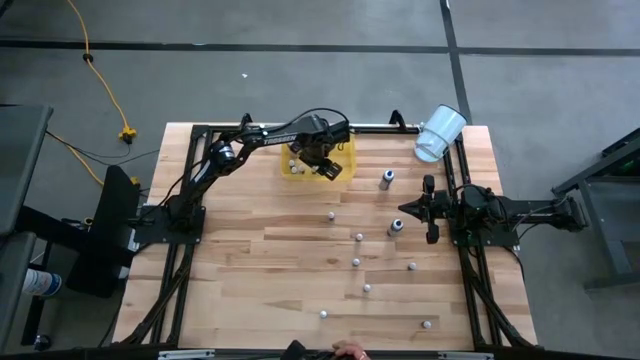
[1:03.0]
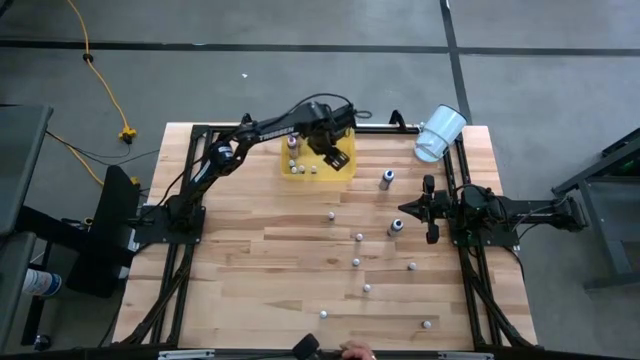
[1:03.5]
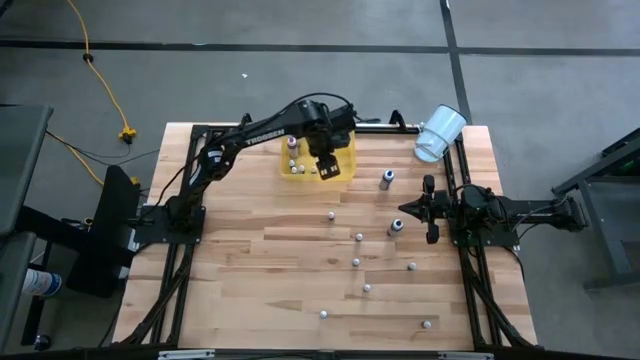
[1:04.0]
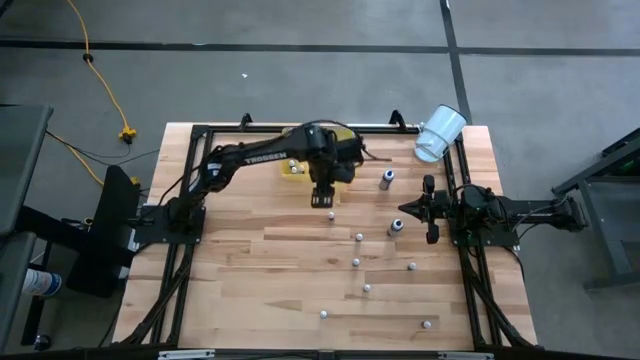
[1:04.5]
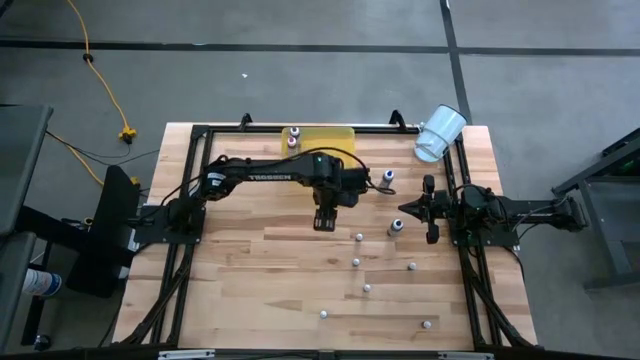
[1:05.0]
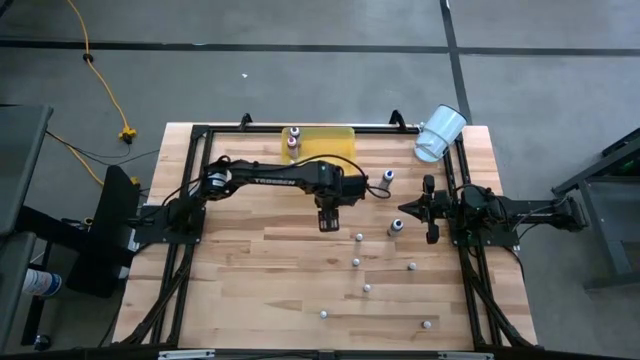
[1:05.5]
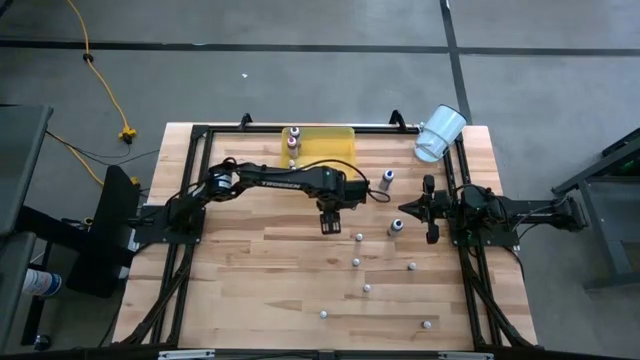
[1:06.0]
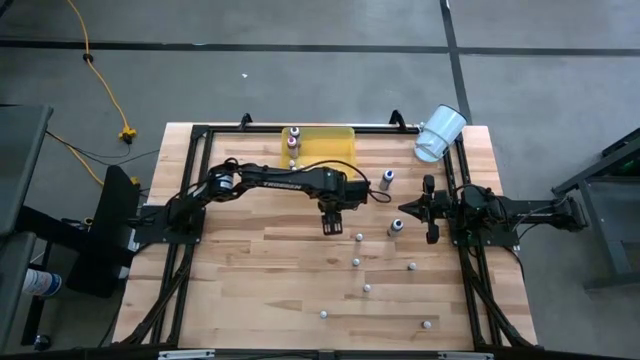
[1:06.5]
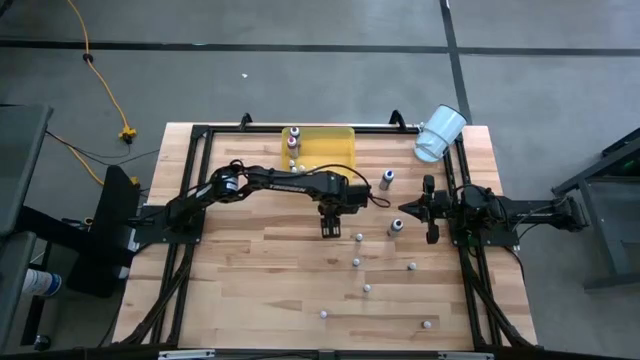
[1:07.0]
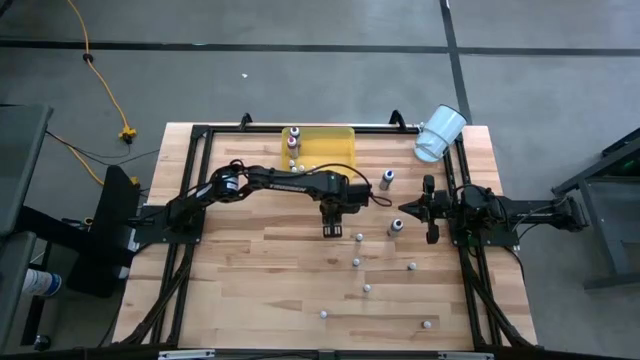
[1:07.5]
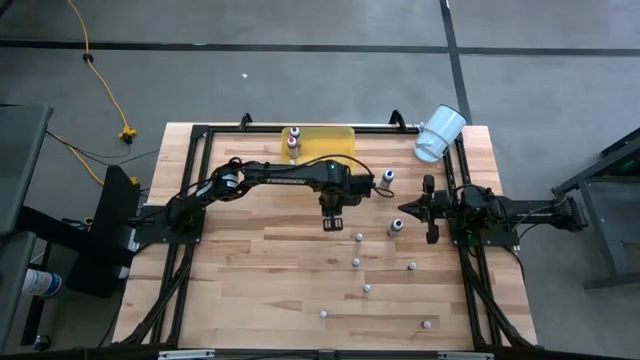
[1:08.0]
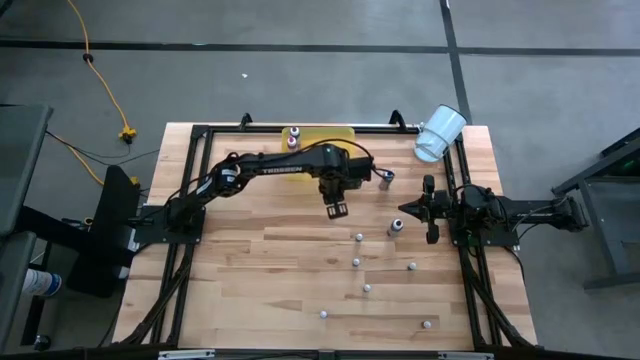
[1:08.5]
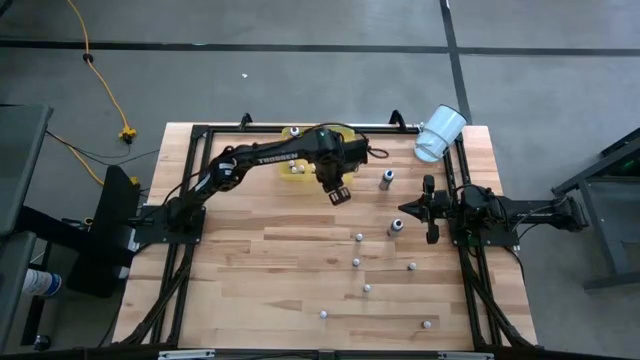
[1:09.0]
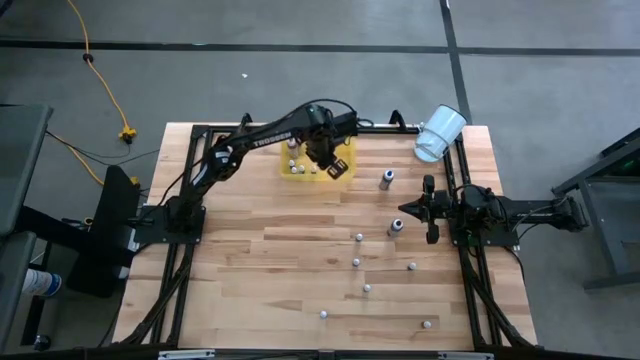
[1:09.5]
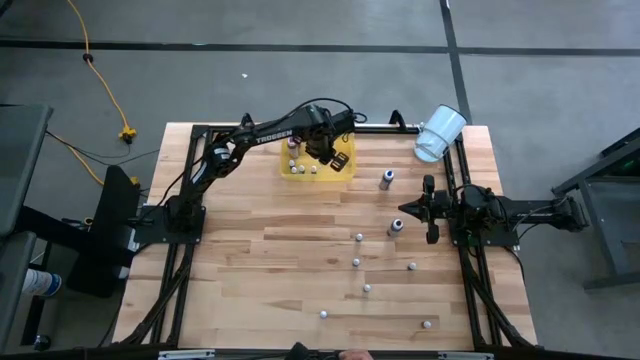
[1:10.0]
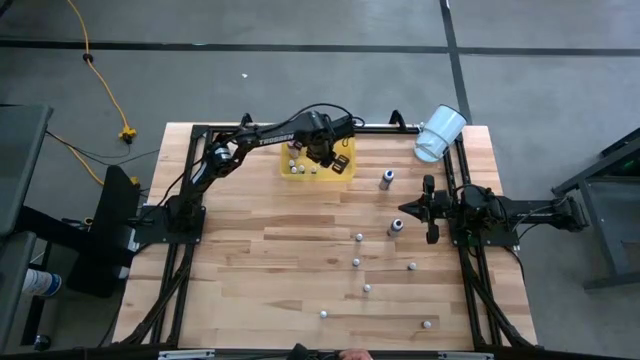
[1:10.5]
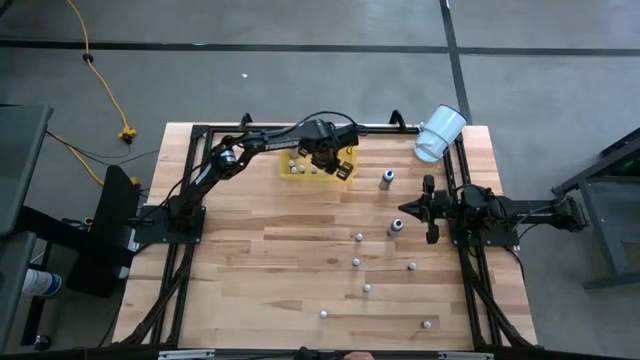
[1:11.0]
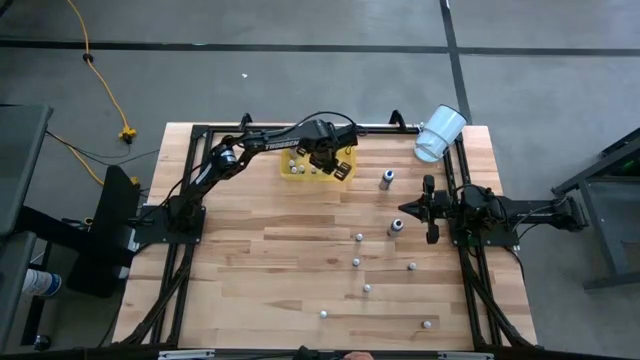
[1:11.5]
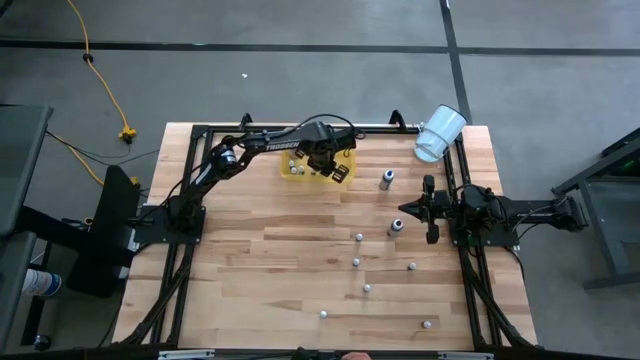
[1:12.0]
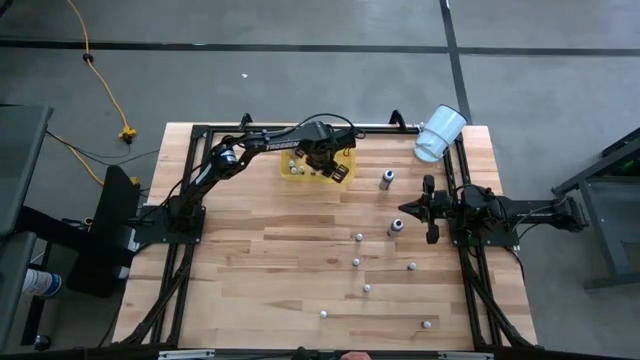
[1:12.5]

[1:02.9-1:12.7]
Task: Pick & Place food coloring
Put the small black food coloring into the yellow container

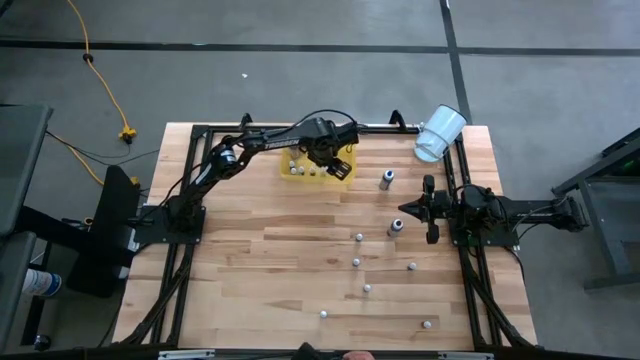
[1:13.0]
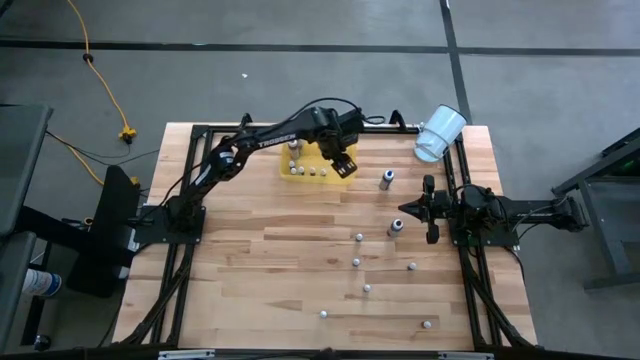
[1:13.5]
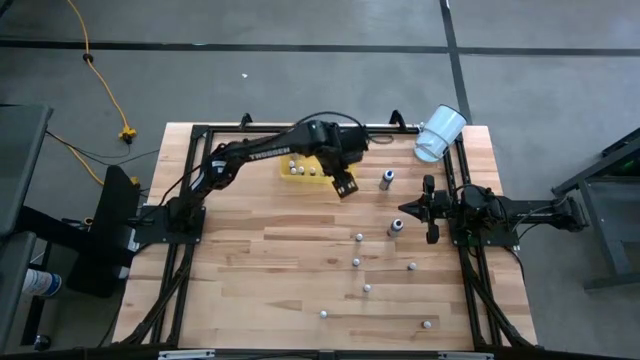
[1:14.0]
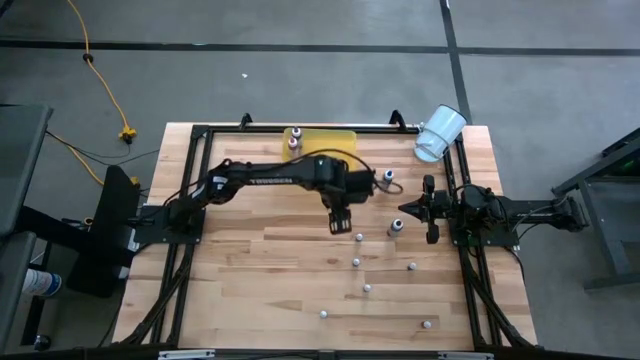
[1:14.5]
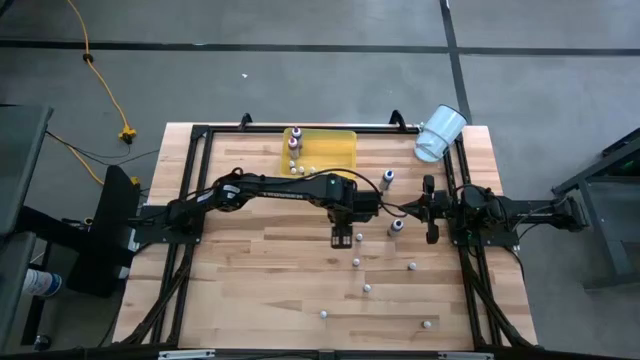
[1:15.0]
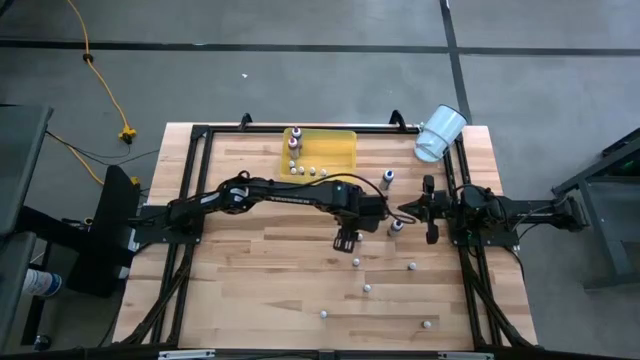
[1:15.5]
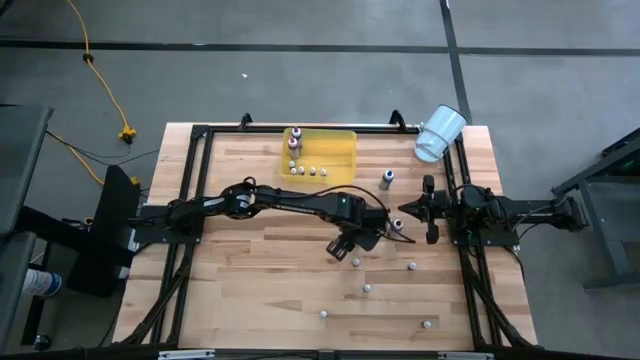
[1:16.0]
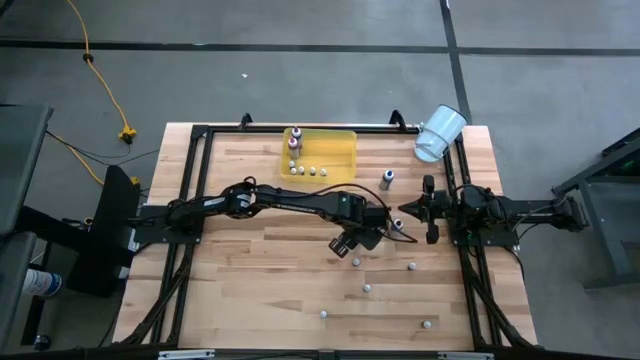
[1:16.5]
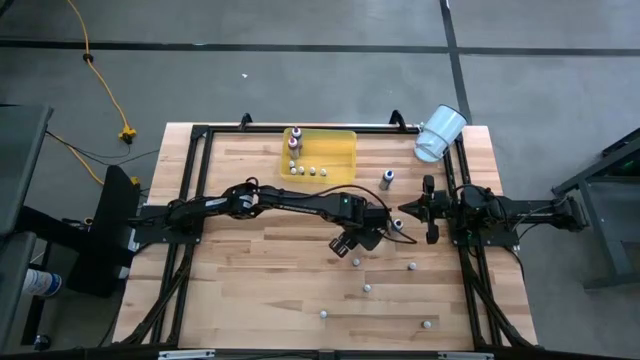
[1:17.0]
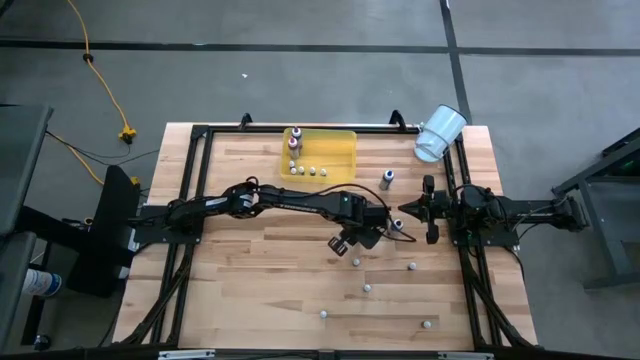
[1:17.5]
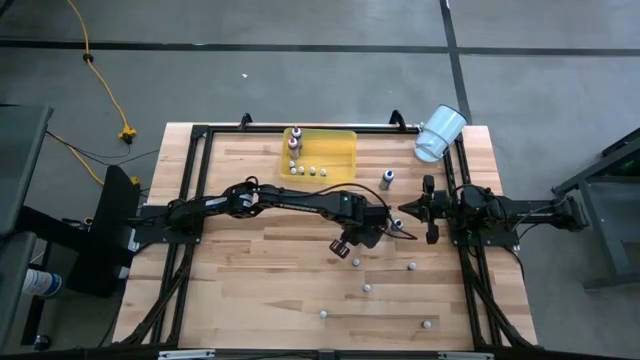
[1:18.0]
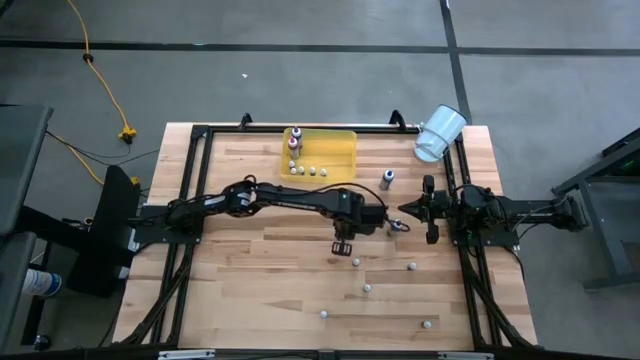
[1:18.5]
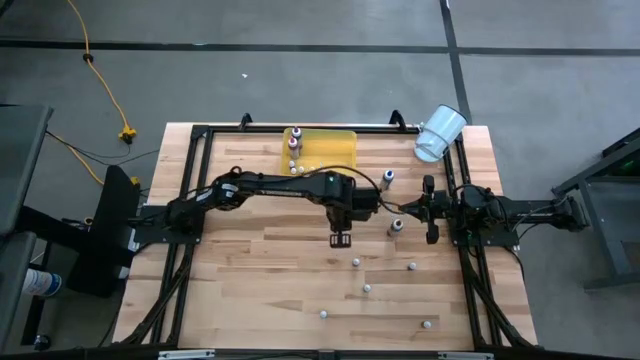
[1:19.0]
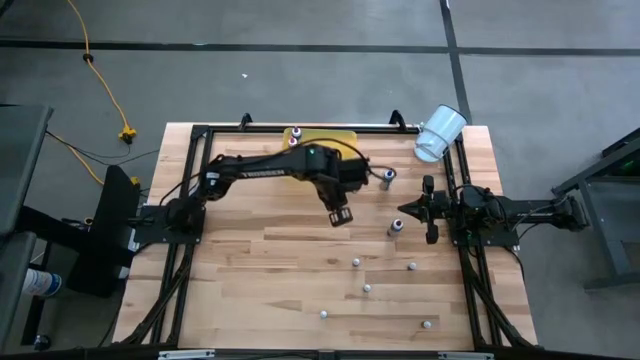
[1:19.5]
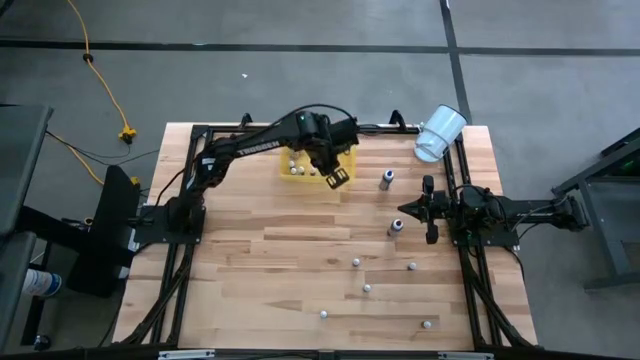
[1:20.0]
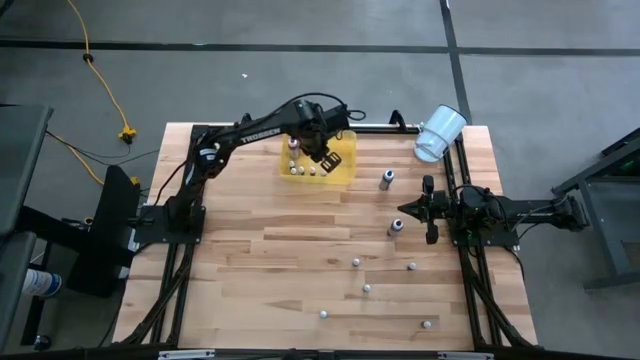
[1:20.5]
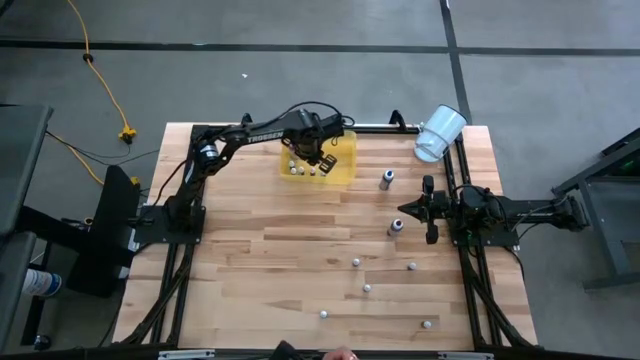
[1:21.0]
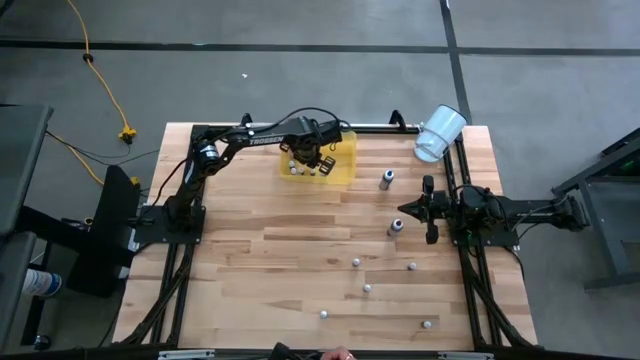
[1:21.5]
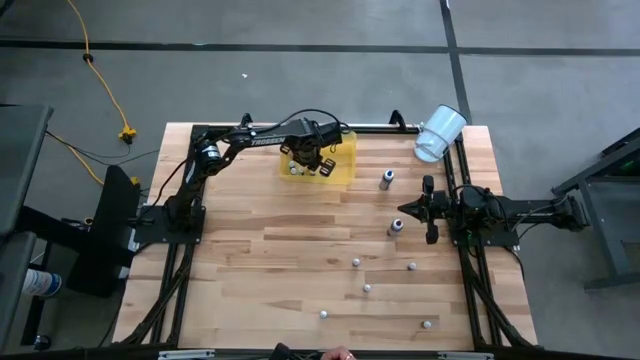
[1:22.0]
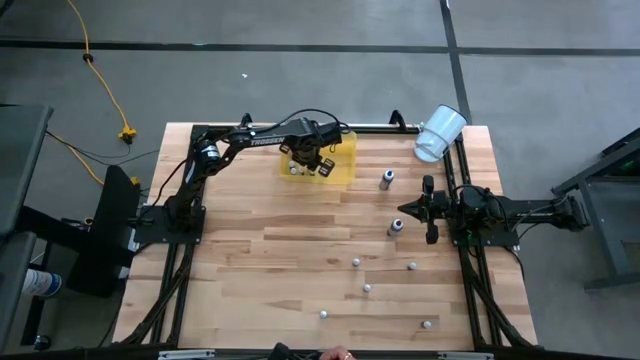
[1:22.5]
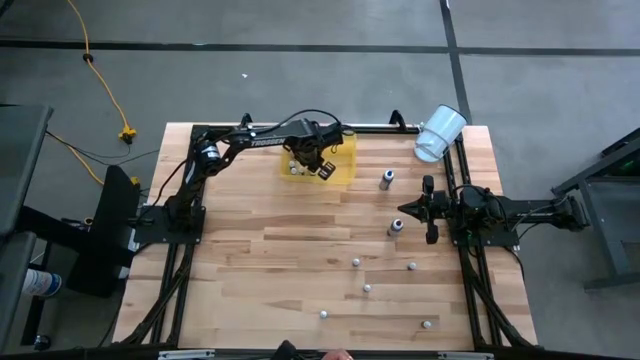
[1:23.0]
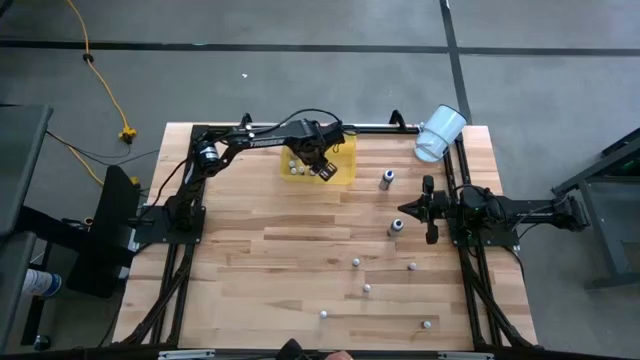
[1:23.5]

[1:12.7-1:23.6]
Put the top small green food coloring into the yellow container

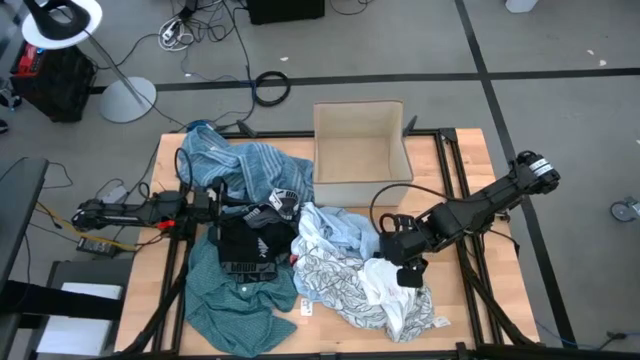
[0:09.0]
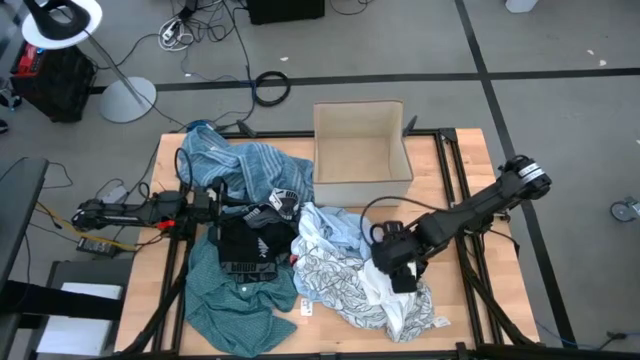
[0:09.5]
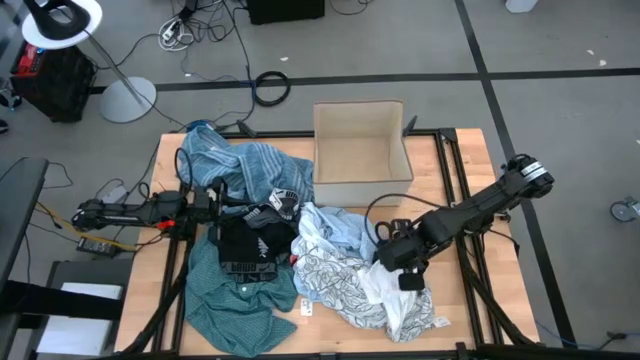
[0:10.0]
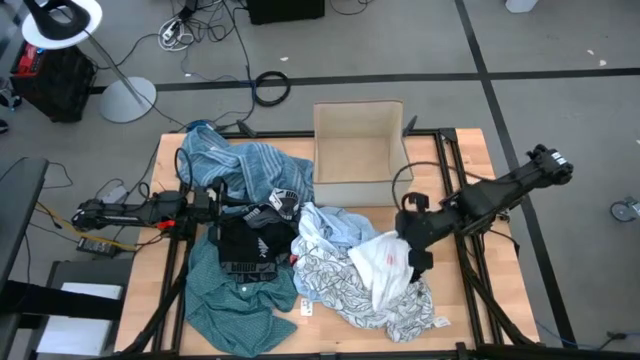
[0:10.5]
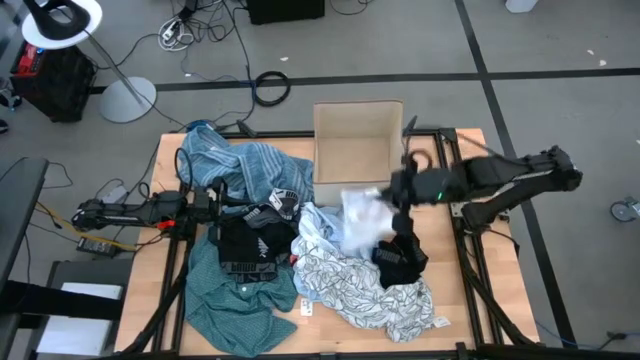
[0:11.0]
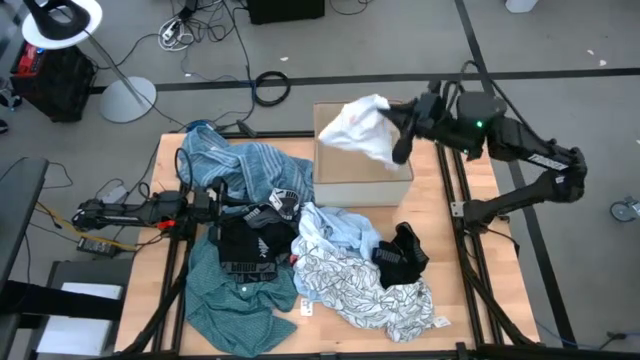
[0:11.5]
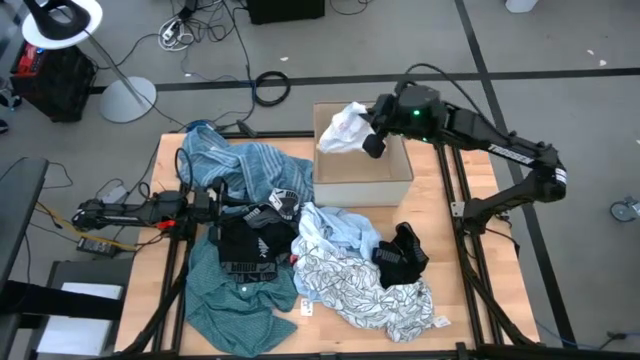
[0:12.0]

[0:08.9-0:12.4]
Task: Sort clothes
Put the white boxer shorts into the gray laundry bin
